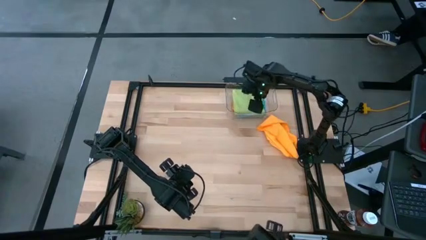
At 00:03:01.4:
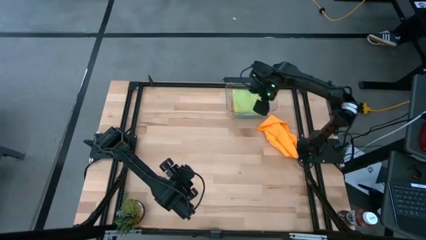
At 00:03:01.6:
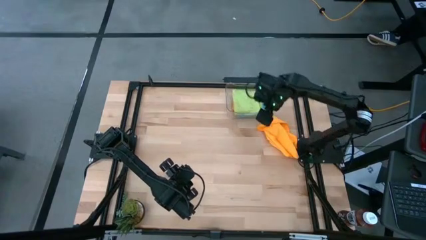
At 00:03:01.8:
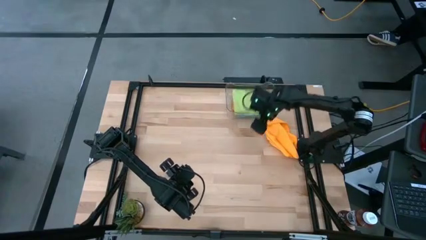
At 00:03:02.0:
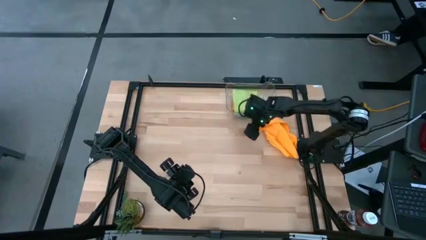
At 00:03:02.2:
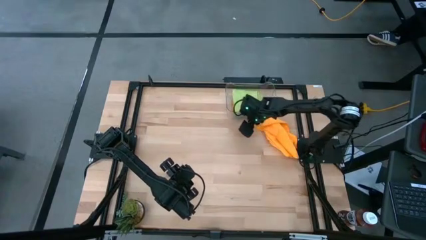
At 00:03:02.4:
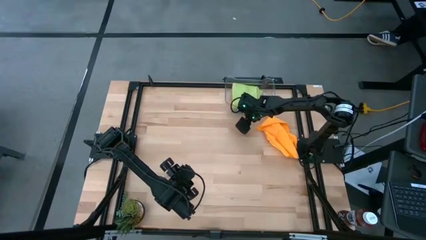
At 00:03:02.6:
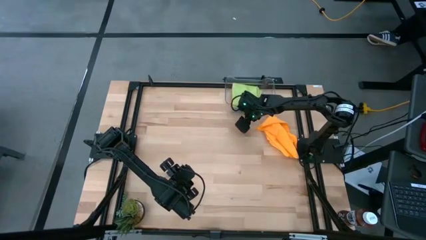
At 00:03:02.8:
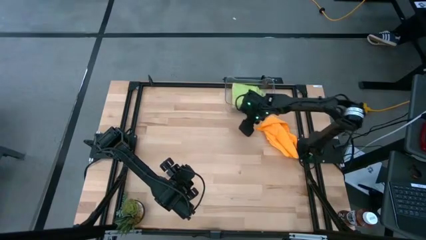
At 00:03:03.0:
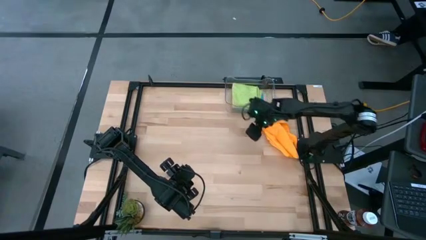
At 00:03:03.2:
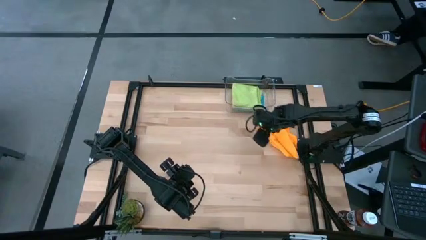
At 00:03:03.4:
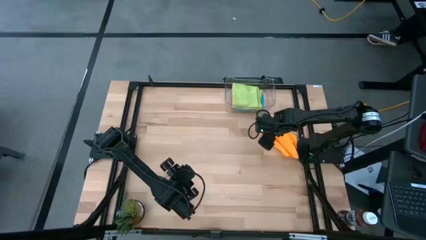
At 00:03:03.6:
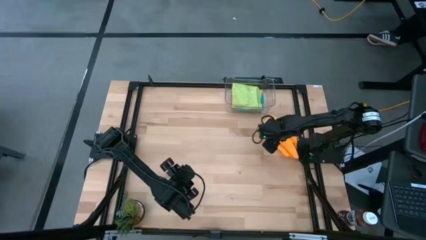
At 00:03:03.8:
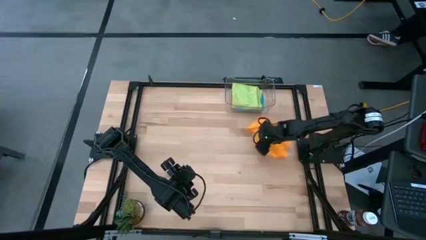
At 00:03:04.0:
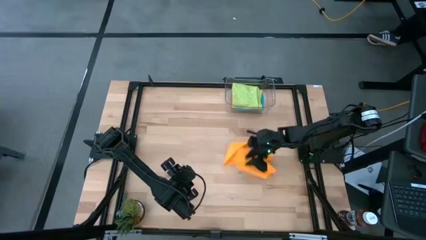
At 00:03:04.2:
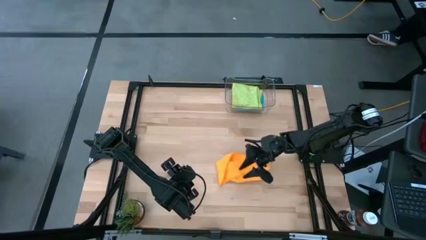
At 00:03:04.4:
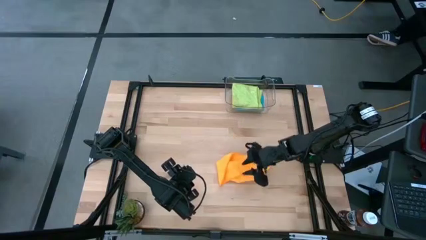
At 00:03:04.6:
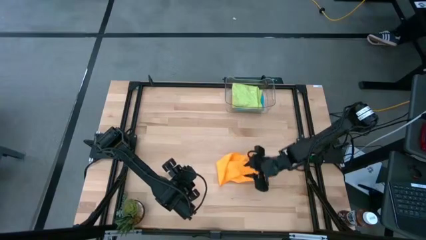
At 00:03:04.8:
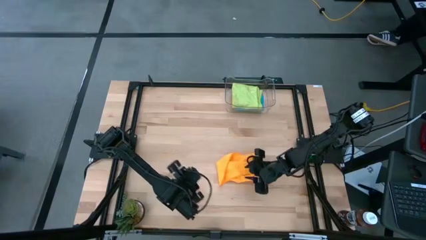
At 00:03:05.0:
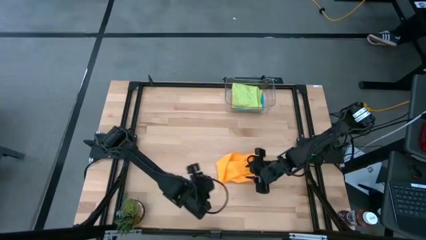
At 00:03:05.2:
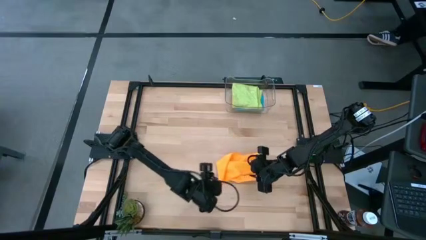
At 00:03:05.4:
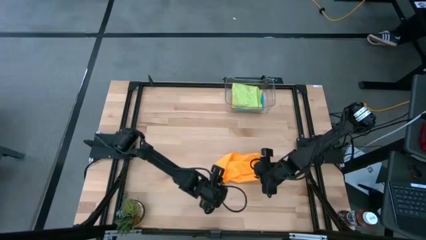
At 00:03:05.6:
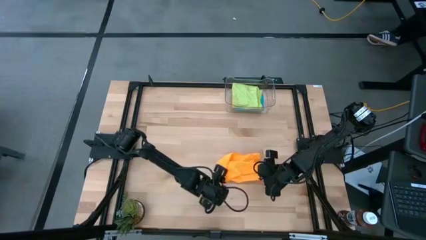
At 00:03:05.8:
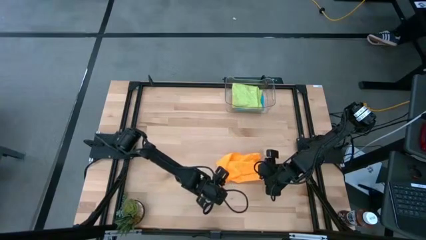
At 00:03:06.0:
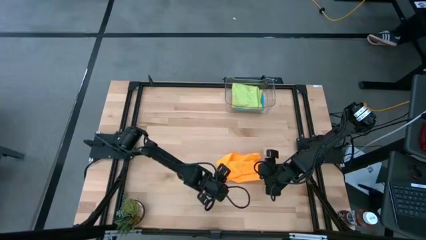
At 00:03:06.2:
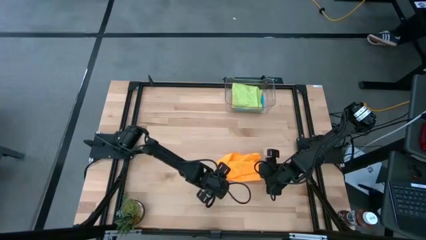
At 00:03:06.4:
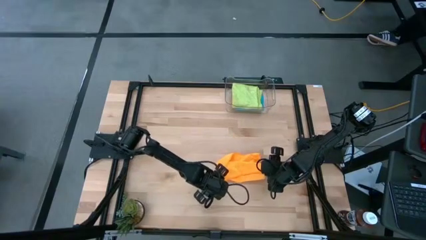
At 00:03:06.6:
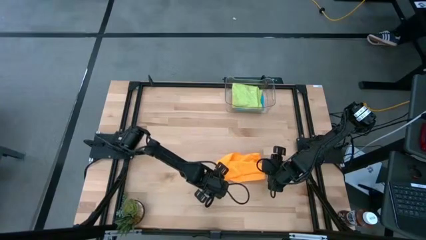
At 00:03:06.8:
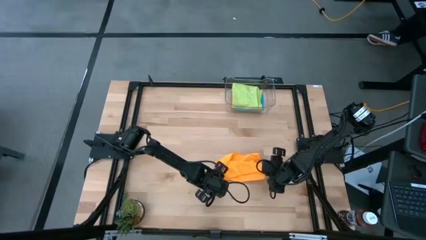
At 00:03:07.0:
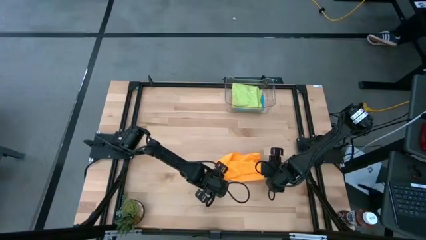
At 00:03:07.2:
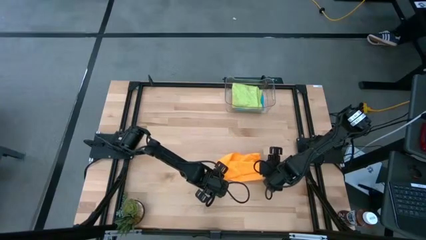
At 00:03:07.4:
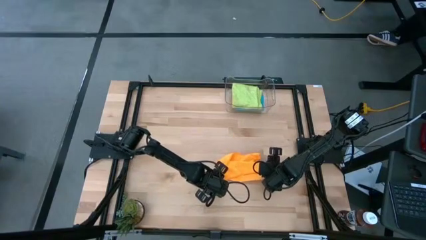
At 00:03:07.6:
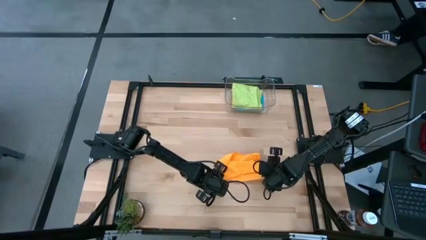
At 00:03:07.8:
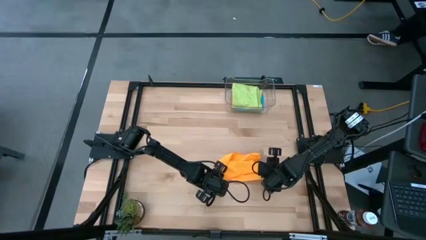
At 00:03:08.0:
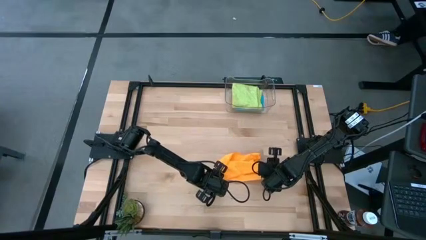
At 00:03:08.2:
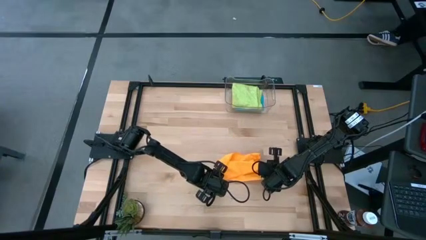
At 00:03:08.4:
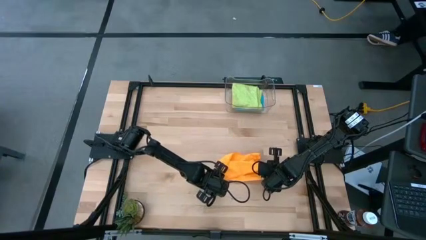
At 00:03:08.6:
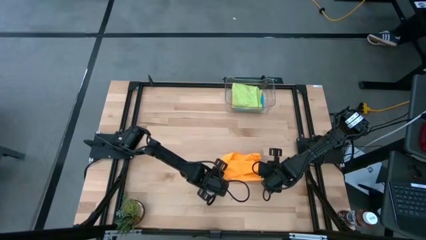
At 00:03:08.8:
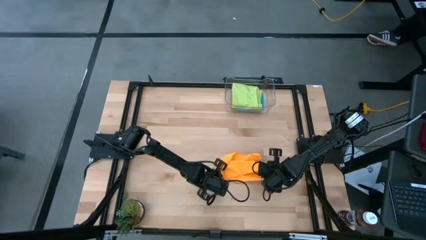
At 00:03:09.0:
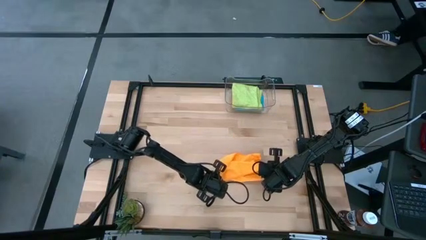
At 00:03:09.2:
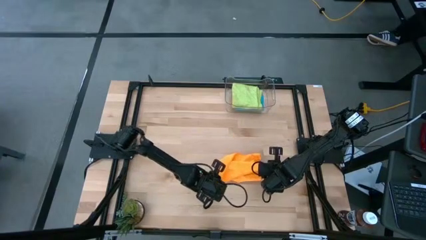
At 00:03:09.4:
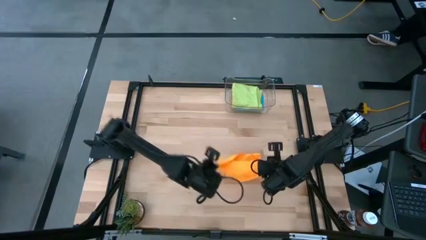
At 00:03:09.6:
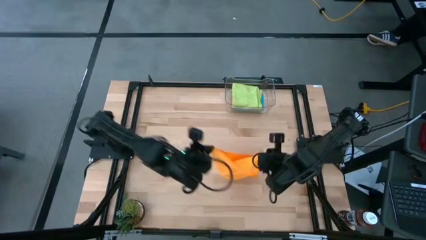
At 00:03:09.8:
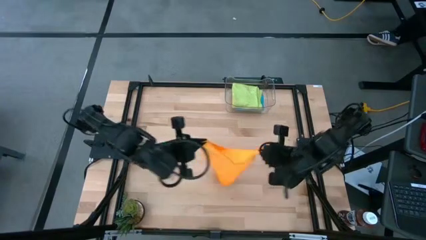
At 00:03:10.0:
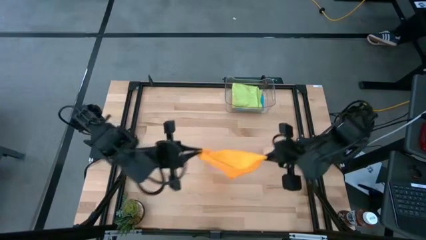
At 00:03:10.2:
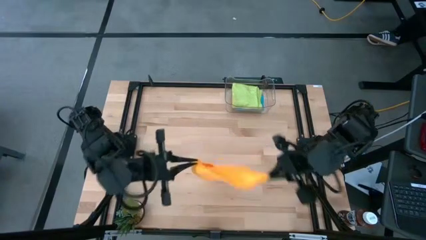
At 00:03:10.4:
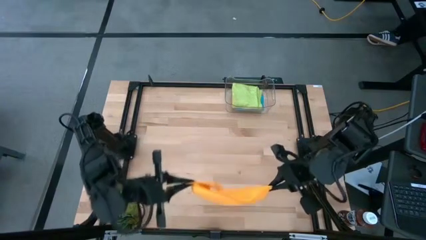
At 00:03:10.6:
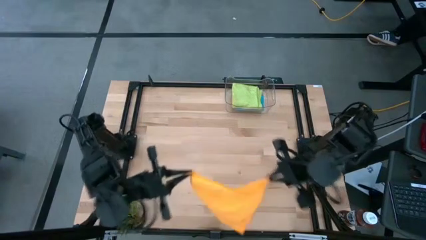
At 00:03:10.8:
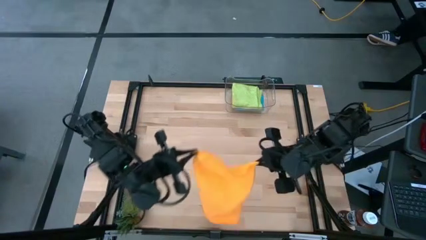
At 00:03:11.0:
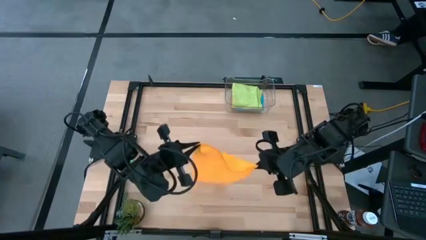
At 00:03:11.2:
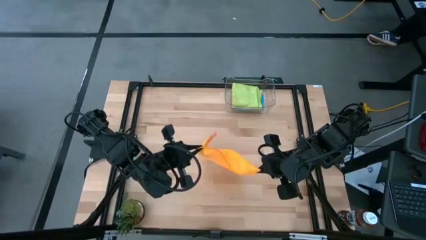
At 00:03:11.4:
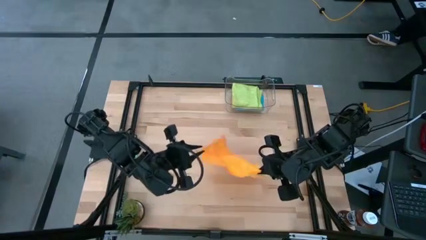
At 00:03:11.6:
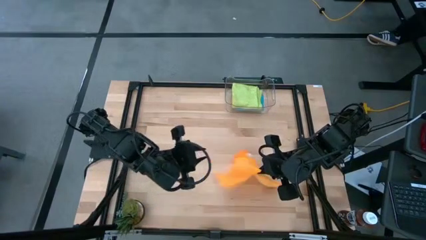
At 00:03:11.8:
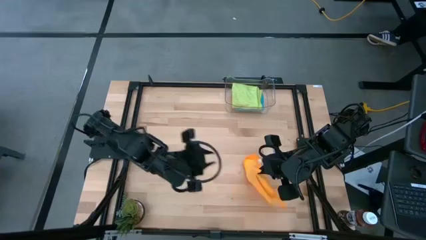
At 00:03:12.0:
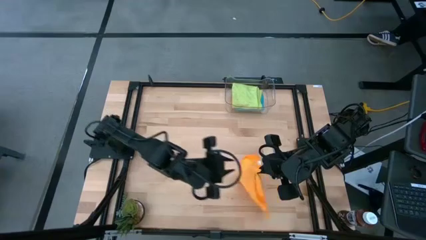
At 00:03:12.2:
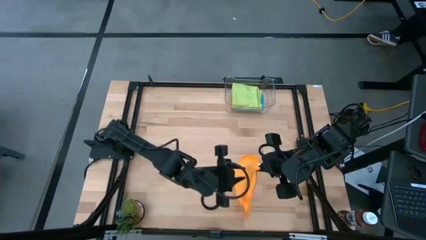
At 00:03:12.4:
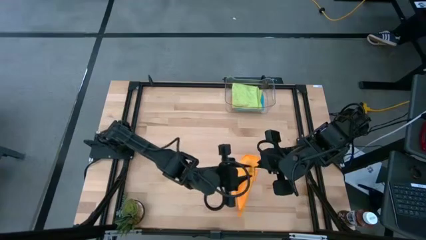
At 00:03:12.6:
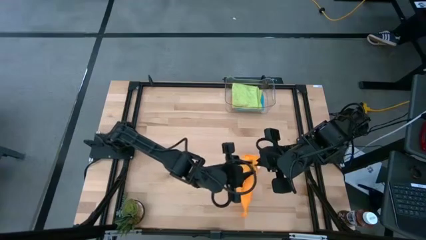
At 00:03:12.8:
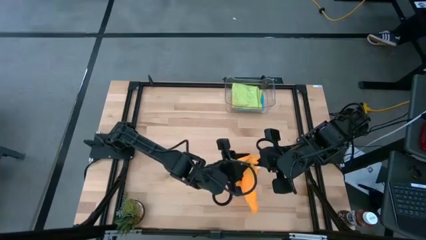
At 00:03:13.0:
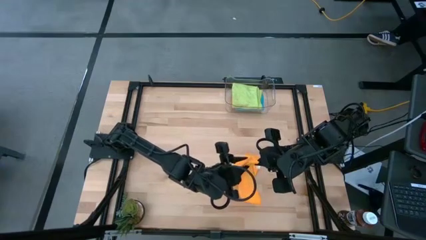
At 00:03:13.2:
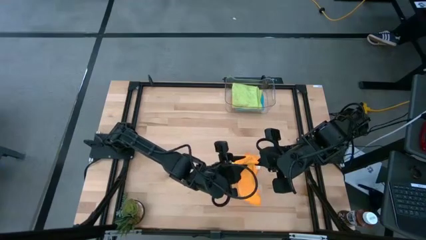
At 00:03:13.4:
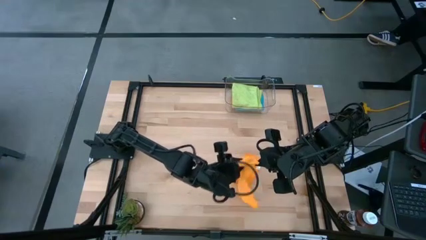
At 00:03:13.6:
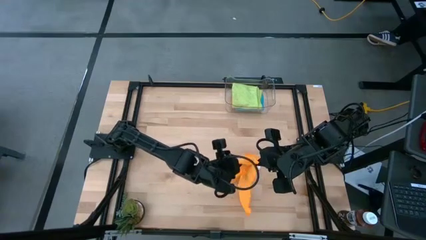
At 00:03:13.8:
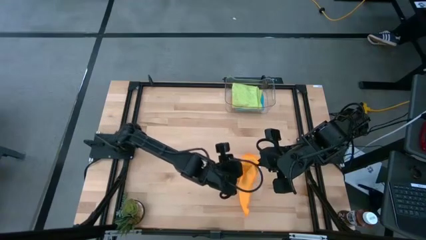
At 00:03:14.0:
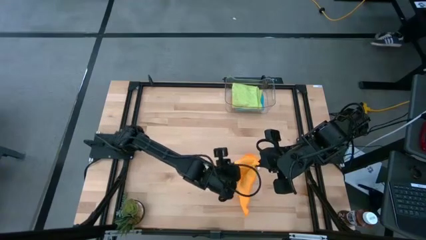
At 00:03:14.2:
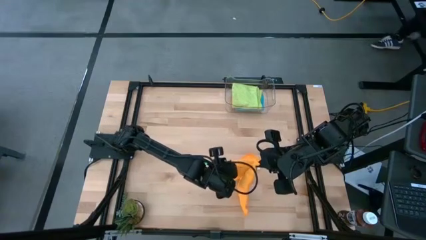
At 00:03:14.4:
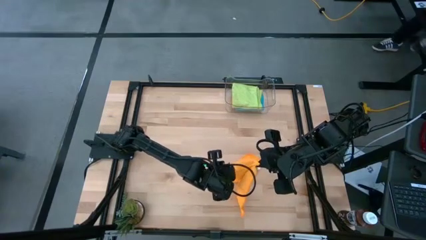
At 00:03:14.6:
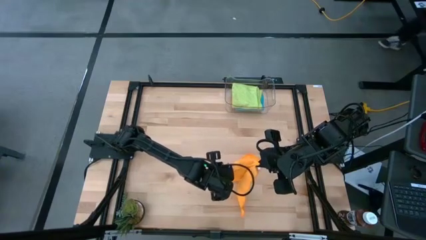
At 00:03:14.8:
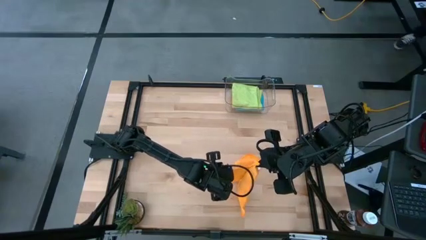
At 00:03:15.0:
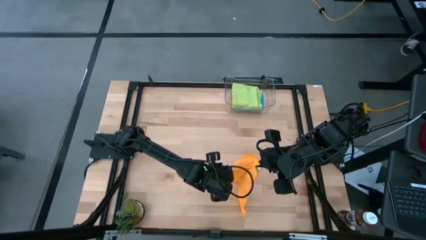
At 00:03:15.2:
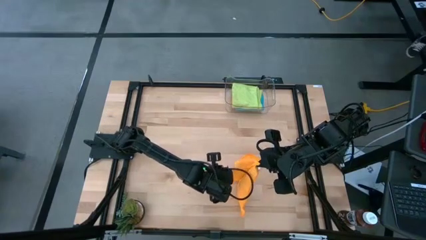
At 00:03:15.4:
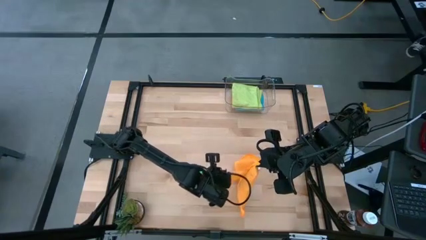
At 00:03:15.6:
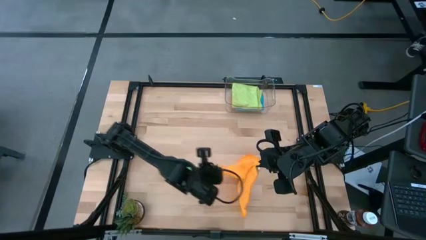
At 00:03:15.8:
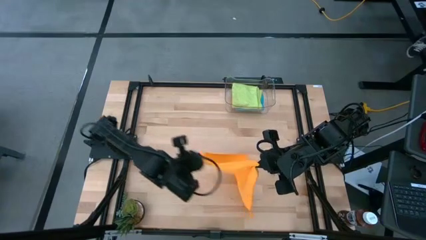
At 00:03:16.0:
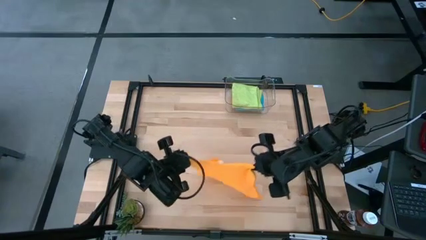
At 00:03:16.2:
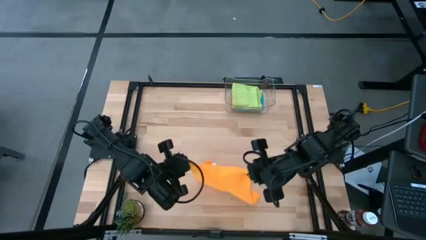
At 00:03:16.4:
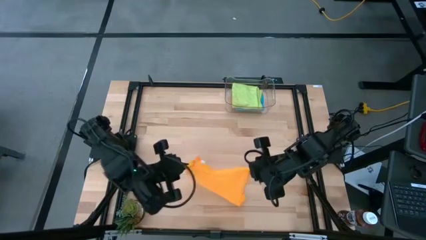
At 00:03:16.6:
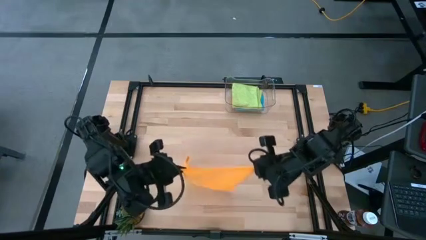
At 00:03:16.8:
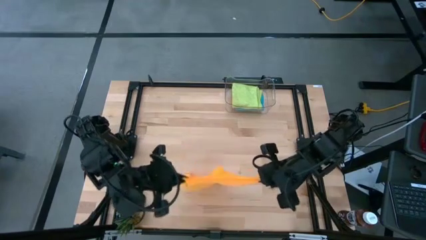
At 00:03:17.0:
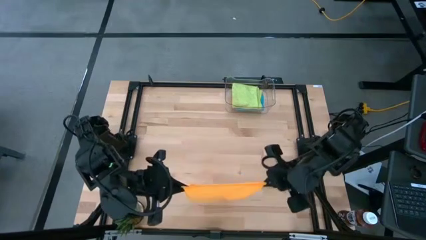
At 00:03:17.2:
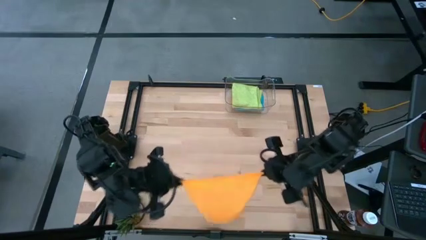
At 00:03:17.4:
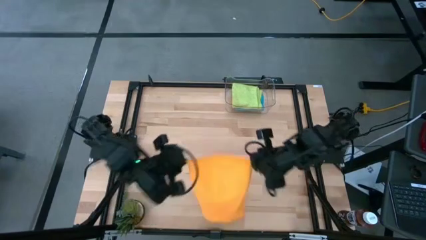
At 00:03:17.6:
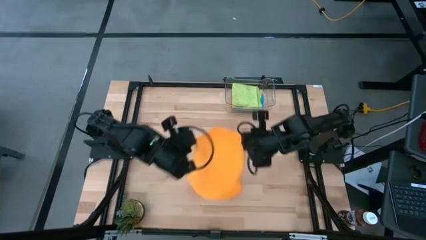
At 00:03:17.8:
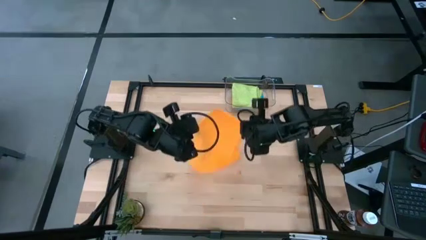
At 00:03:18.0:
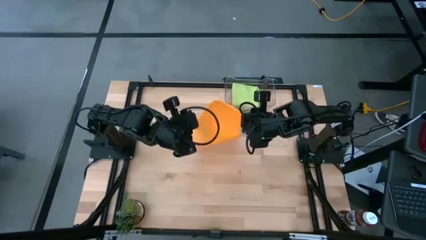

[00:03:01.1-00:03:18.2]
Task: Fold microfiber towels
Fold the yellow microfiber cloth
